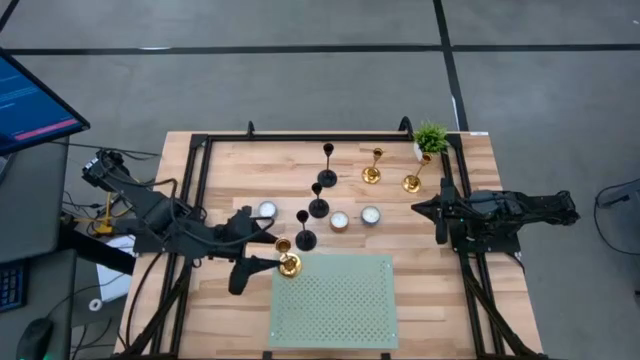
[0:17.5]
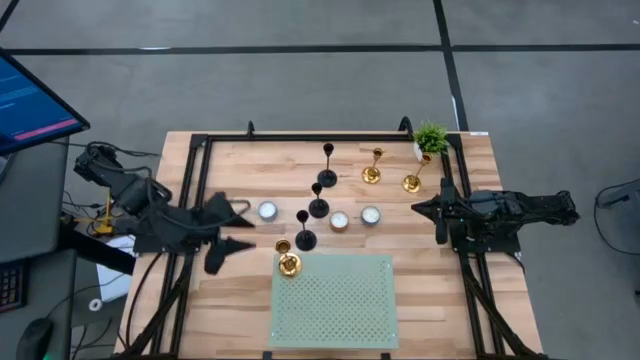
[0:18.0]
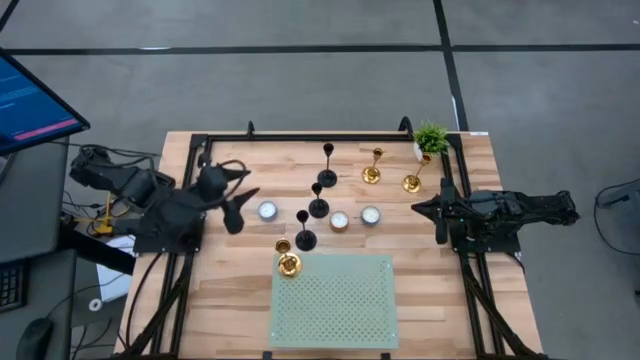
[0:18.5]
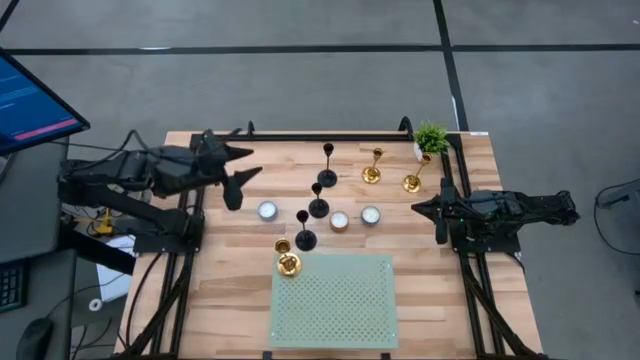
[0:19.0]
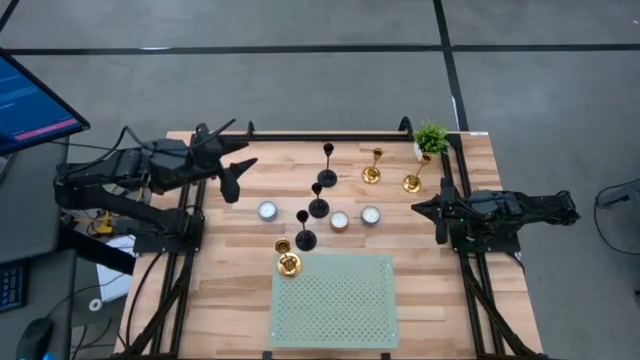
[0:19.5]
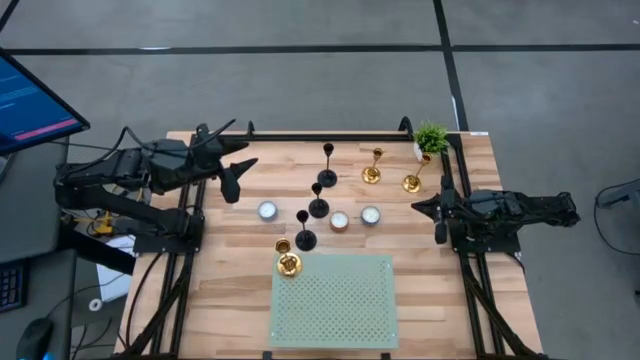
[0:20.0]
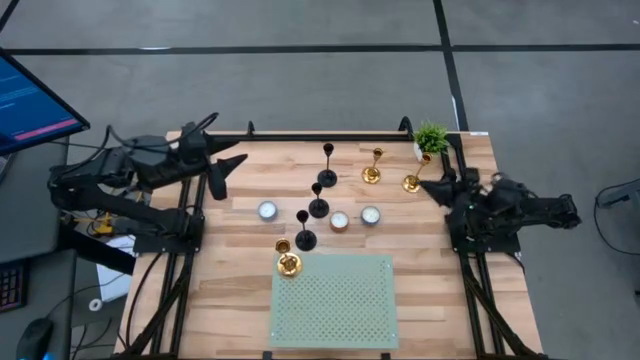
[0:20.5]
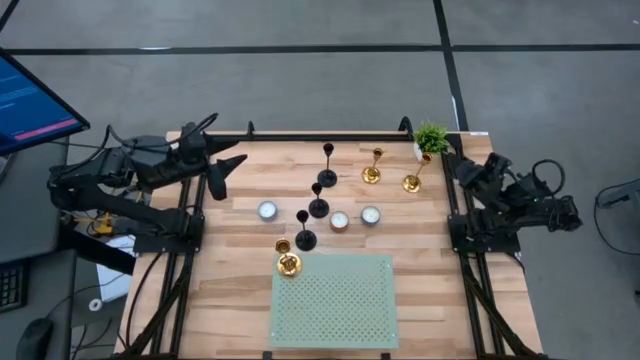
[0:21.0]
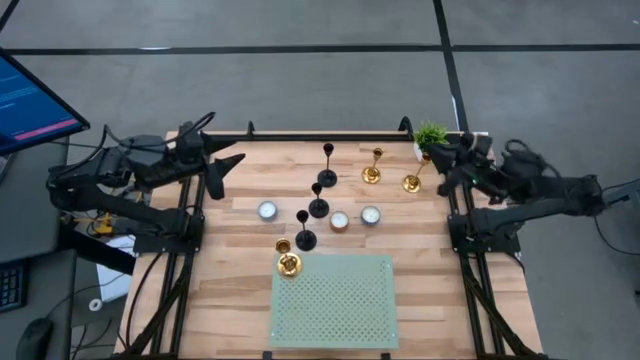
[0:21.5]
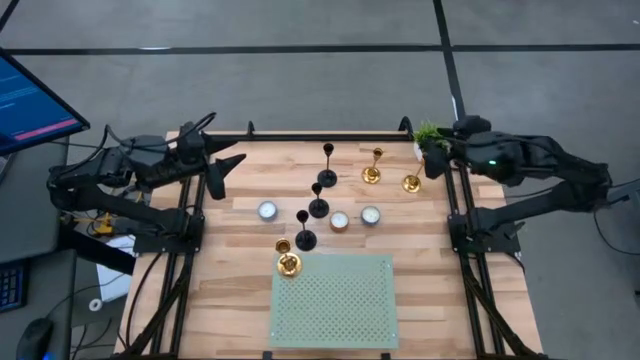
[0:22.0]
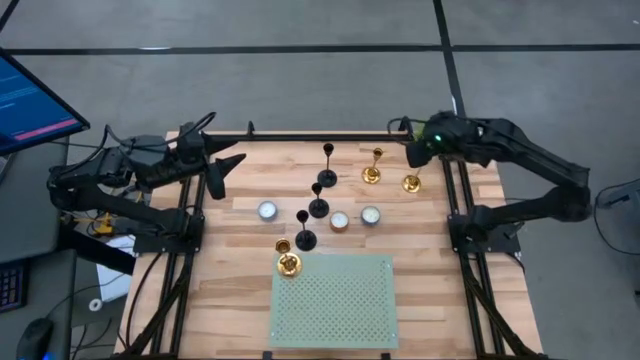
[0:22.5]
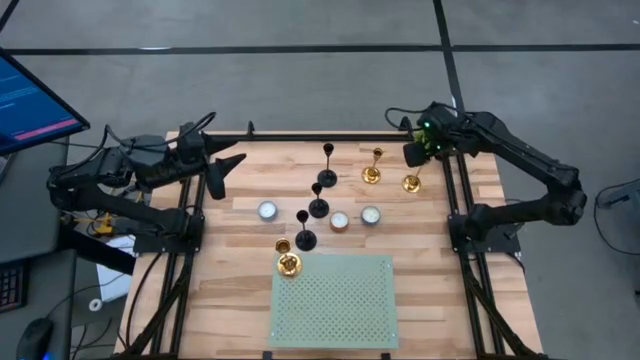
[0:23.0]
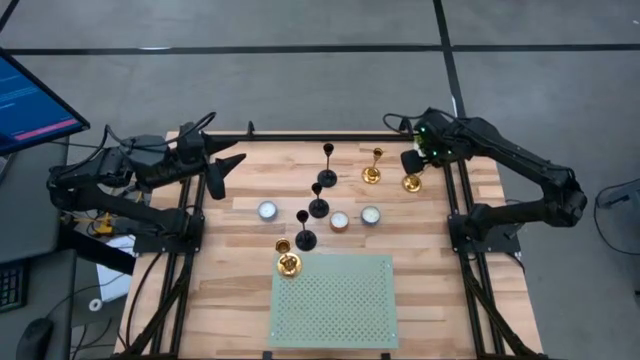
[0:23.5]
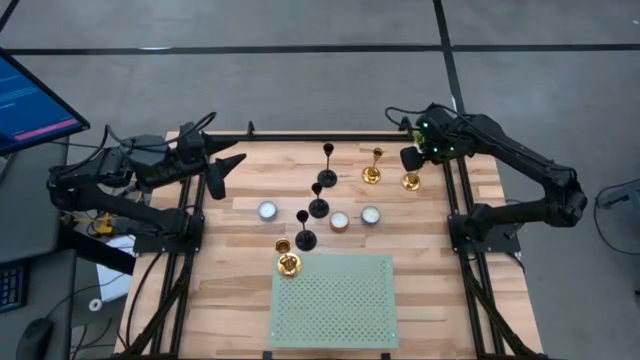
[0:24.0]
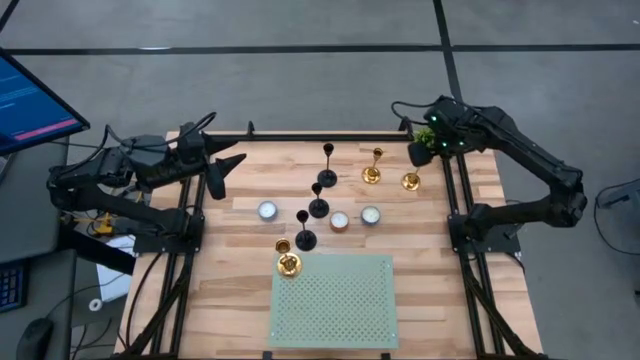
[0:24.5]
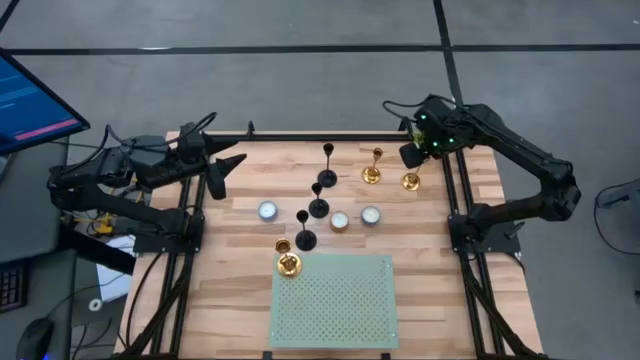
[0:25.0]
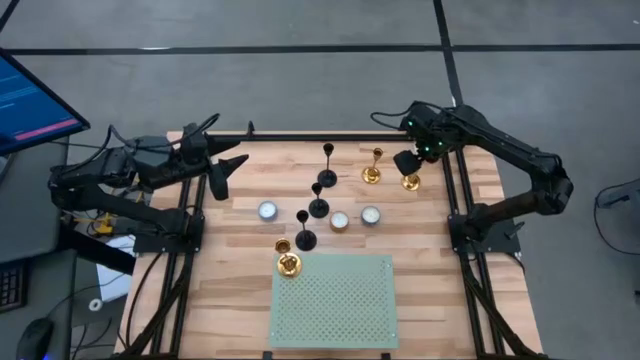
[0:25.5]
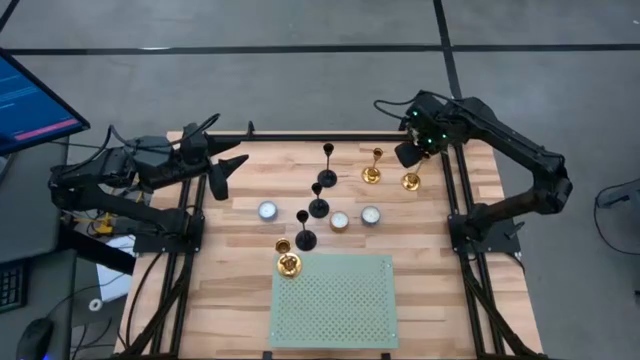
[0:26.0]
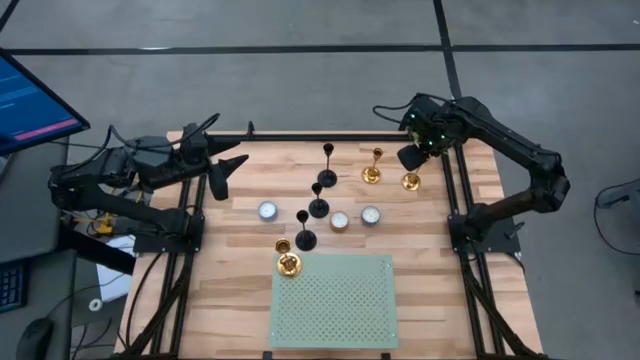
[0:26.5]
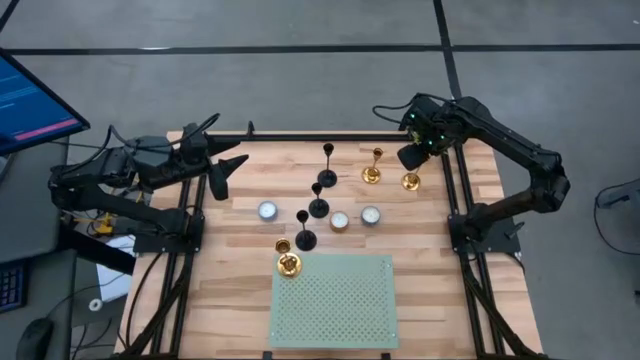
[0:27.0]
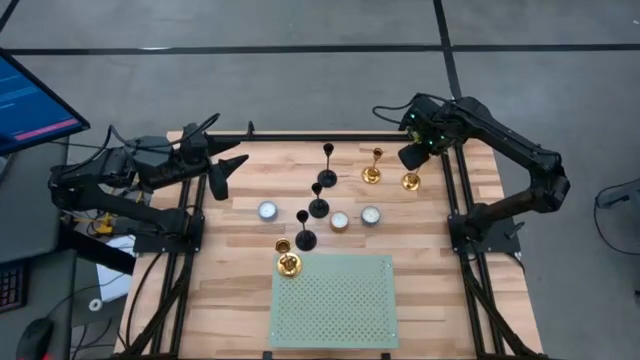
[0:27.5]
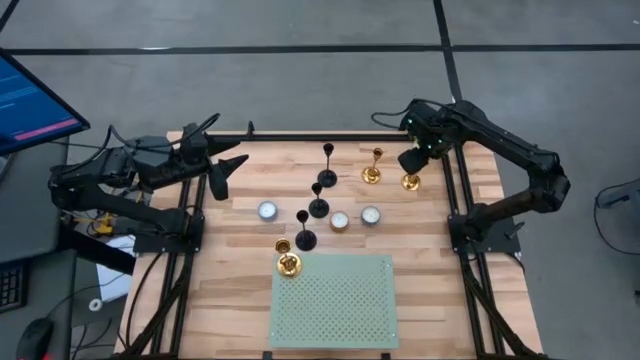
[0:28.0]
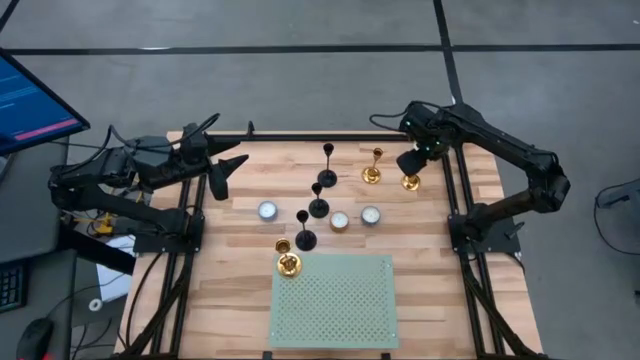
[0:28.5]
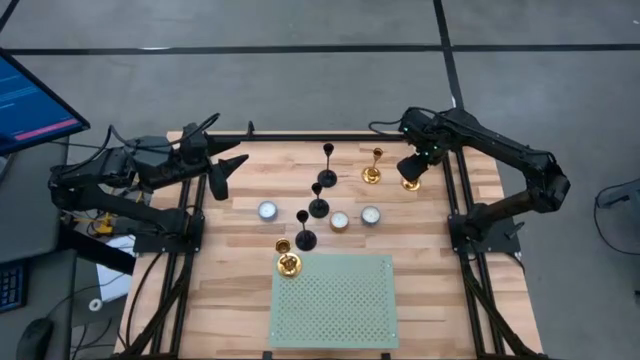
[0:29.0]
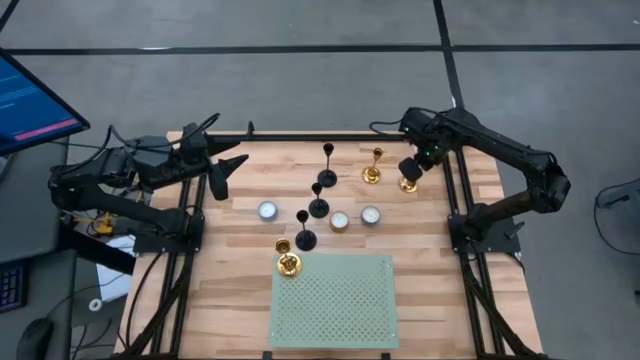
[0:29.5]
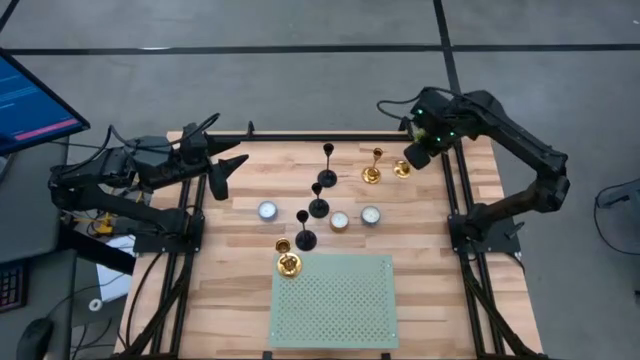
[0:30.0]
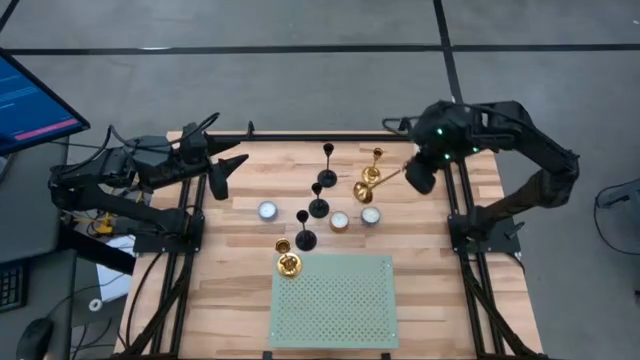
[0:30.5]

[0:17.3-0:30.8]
Task: Pick & Place candle stick holders
Put the right gold candle holder on the shelf aligned with the other gold candle holder

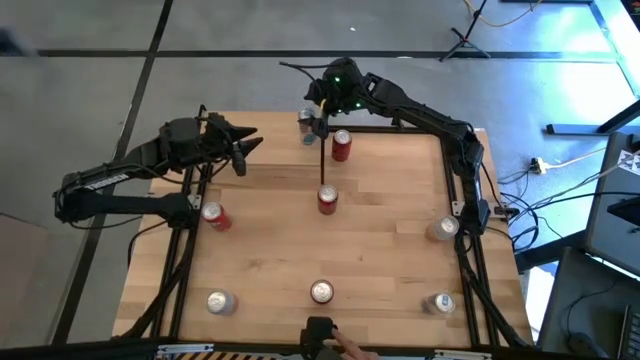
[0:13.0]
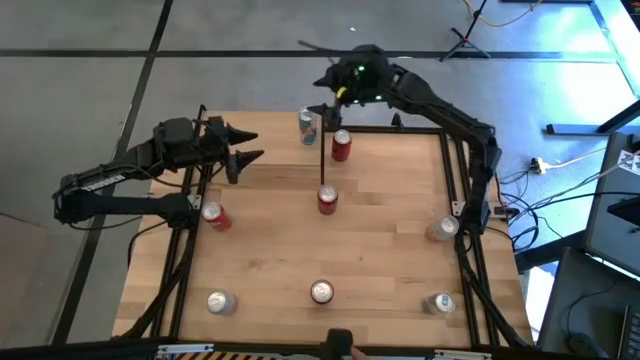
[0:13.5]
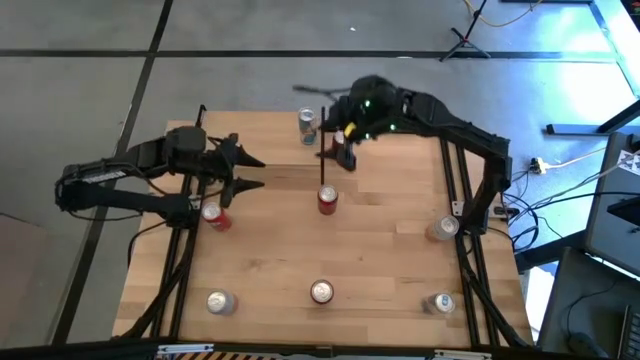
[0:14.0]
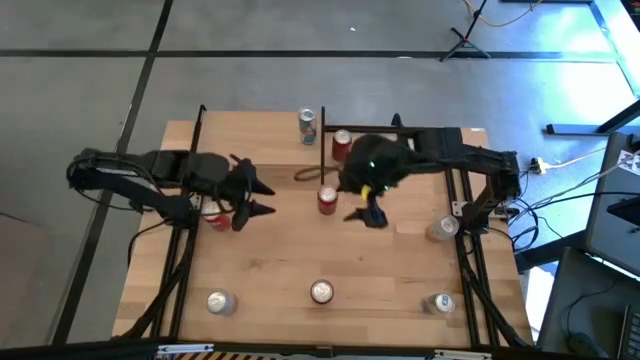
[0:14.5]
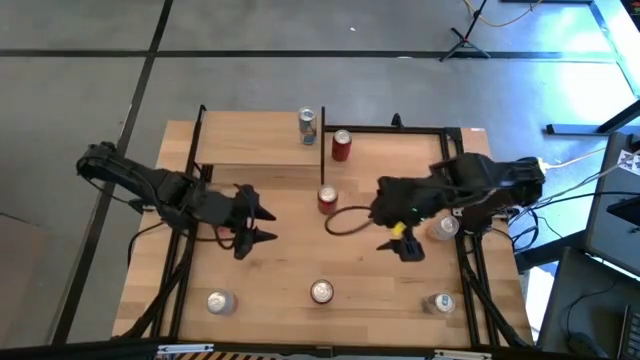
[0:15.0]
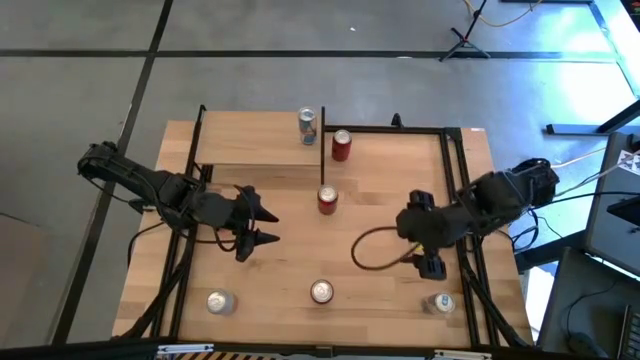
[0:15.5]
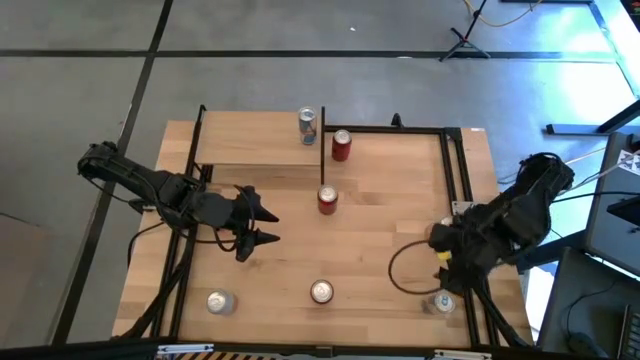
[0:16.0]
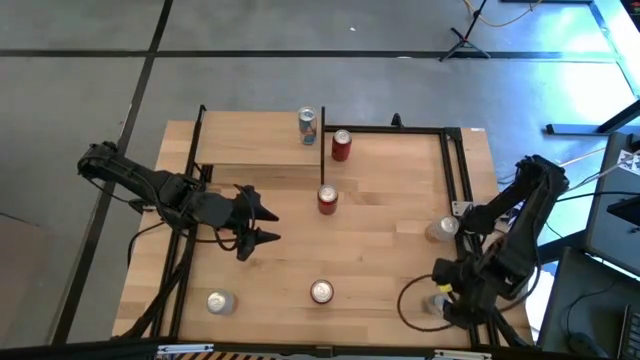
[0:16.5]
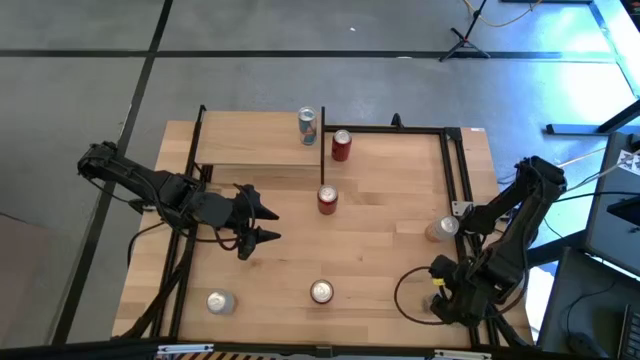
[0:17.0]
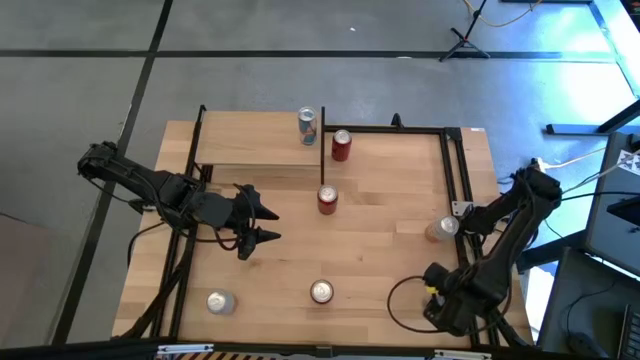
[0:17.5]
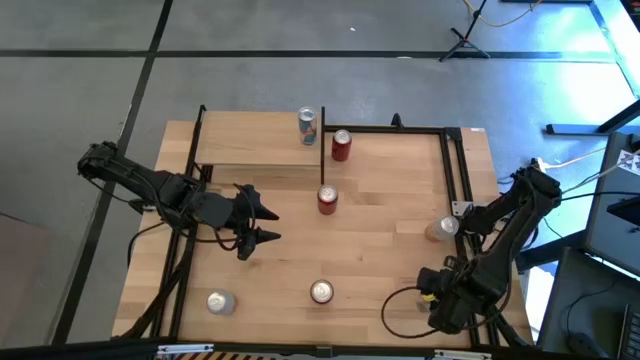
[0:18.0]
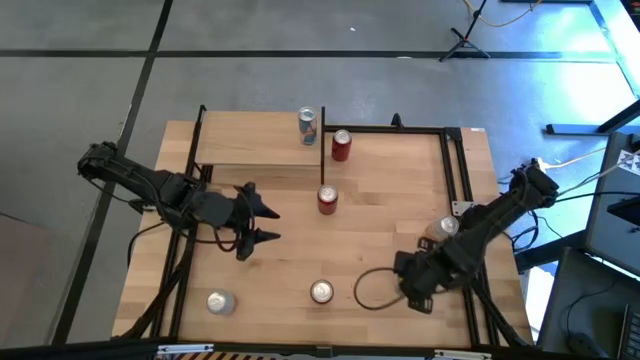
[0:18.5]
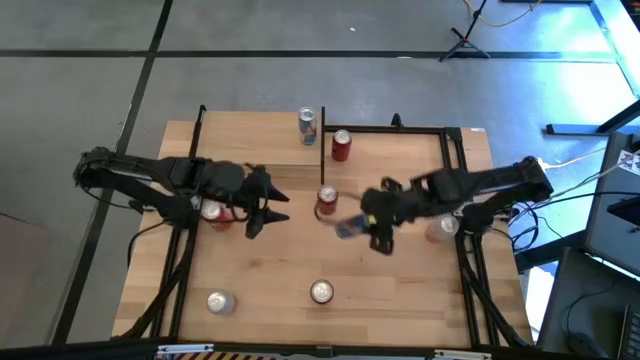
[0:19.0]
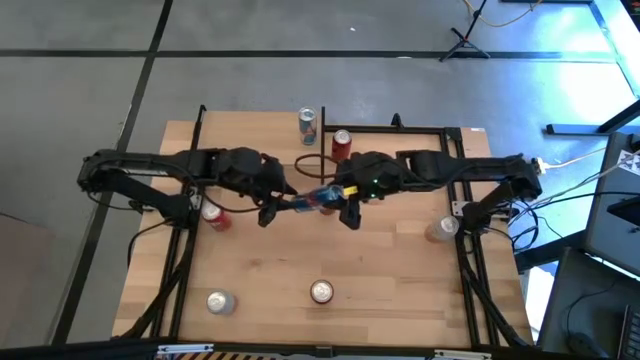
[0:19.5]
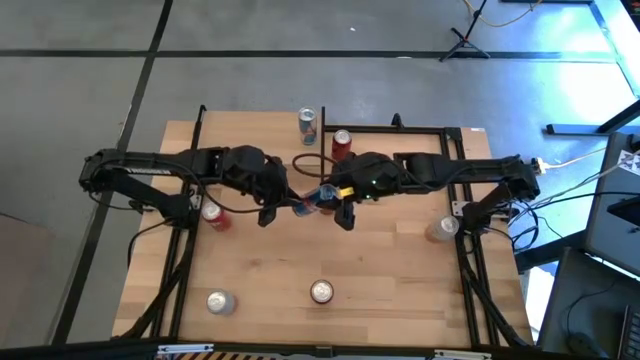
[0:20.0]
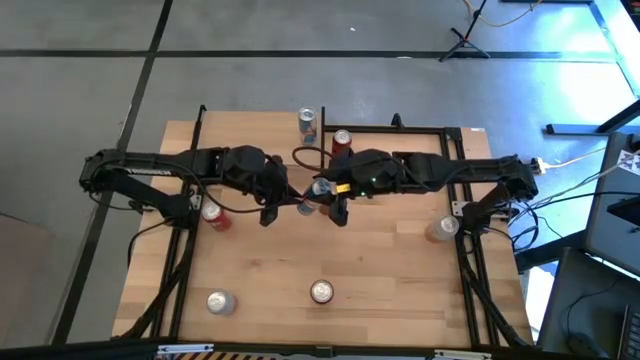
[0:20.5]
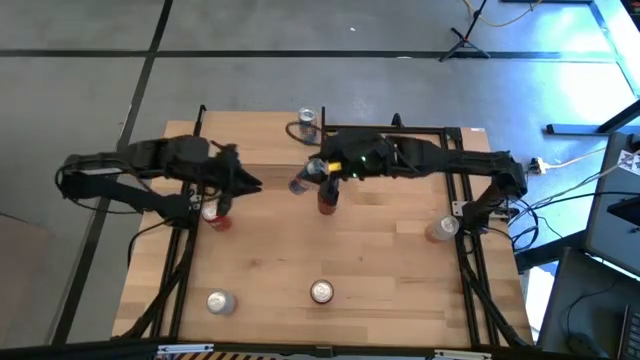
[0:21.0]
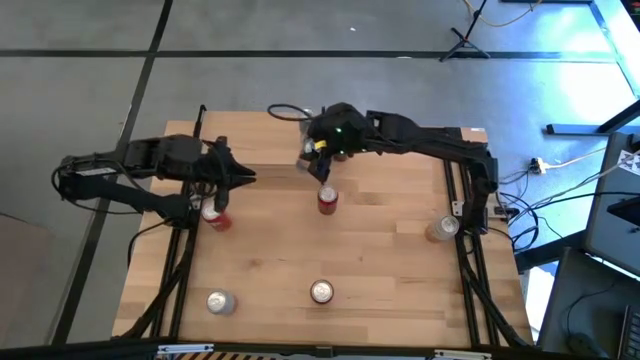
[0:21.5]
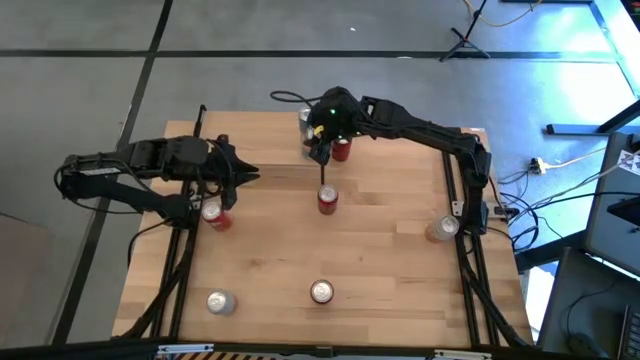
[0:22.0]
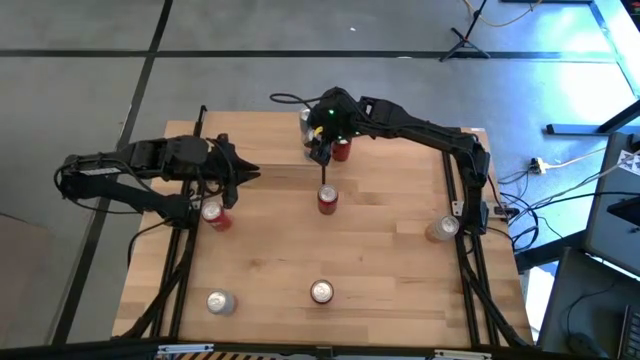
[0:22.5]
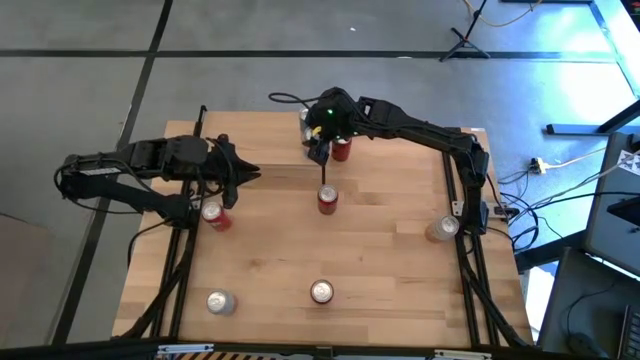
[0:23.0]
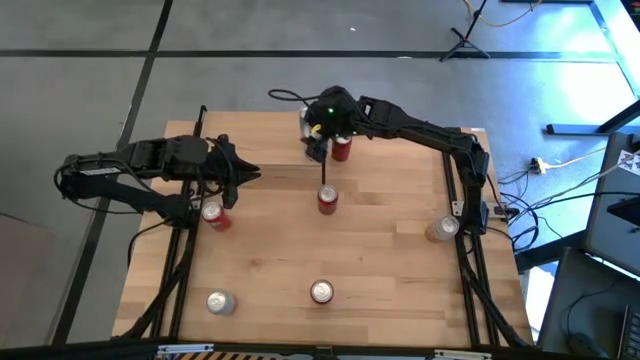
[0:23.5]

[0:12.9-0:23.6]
Task: Place canned beverage on shelf
Put the blue soda can on the shelf aligned with the other blue soda can
